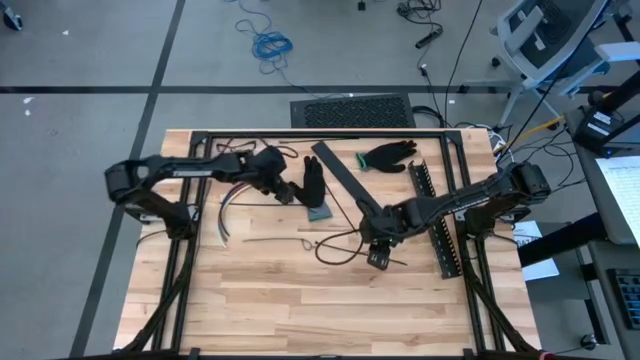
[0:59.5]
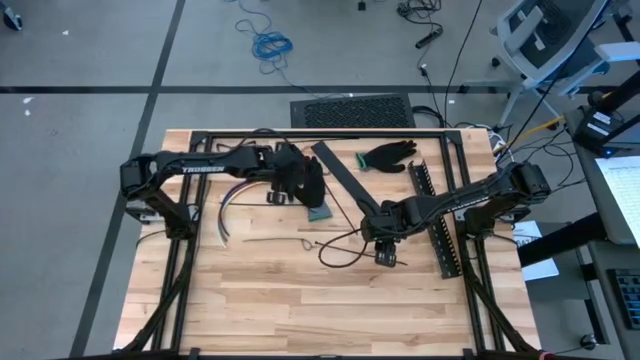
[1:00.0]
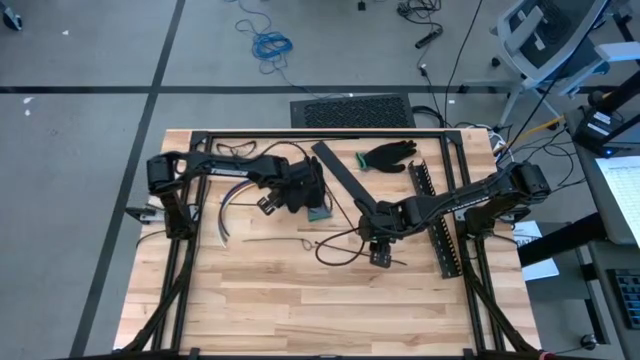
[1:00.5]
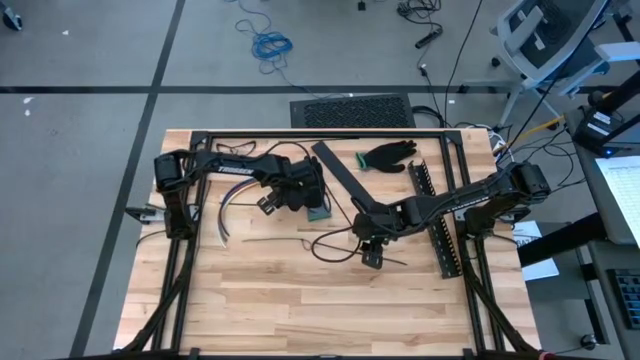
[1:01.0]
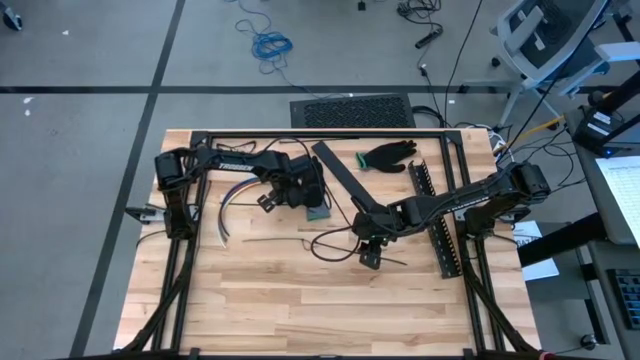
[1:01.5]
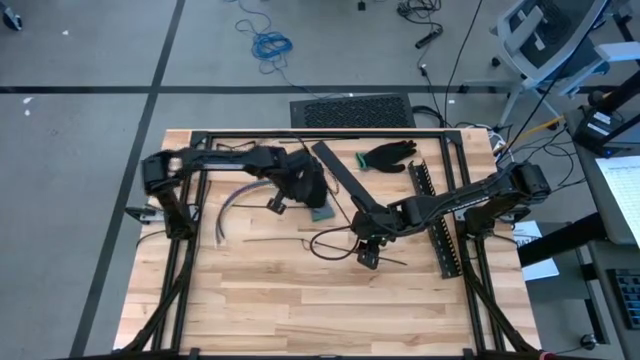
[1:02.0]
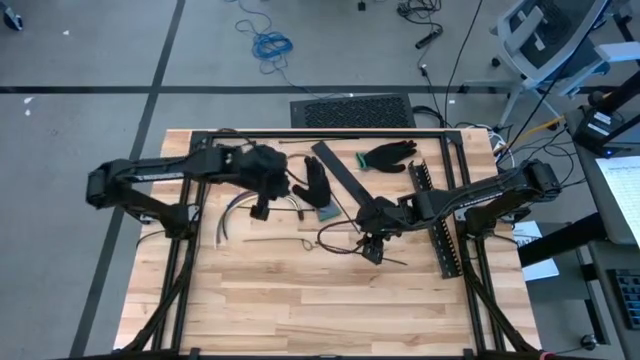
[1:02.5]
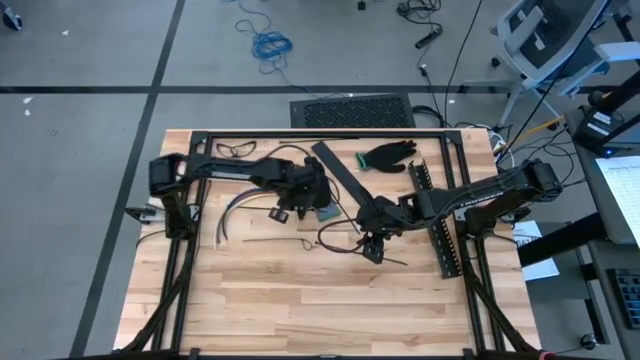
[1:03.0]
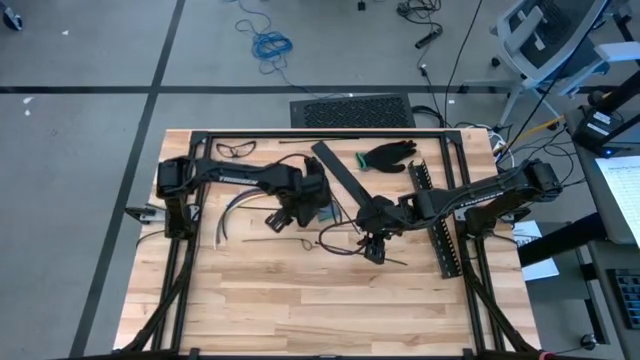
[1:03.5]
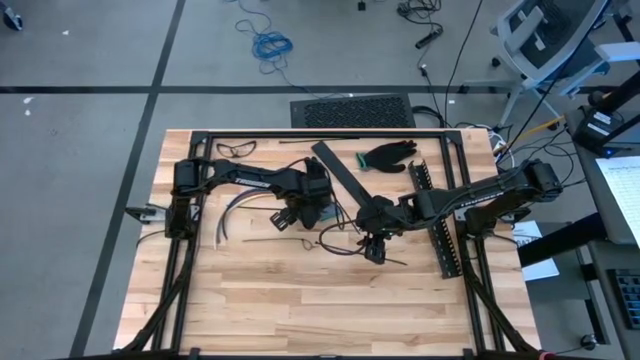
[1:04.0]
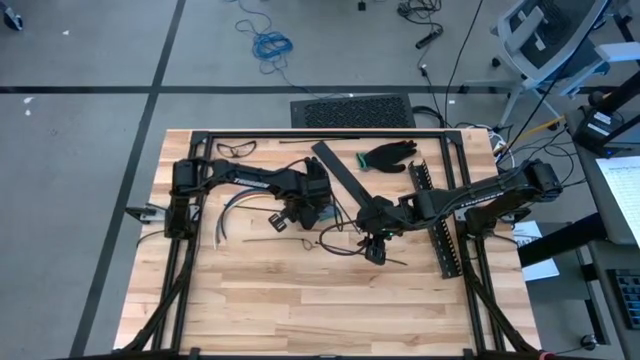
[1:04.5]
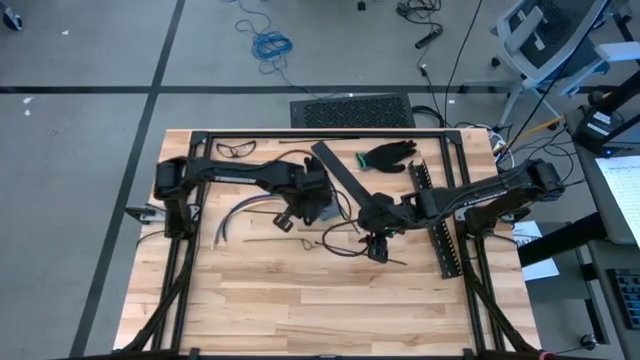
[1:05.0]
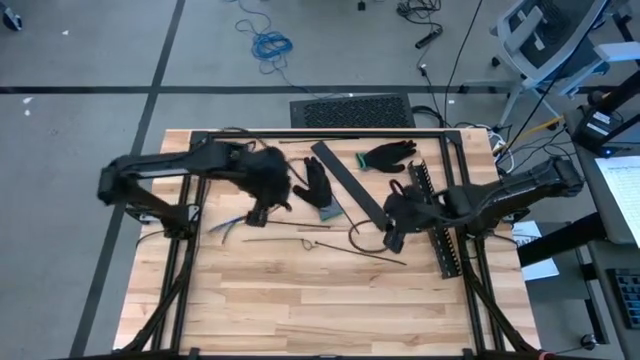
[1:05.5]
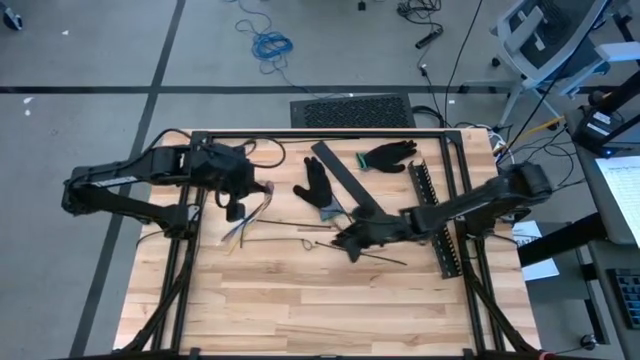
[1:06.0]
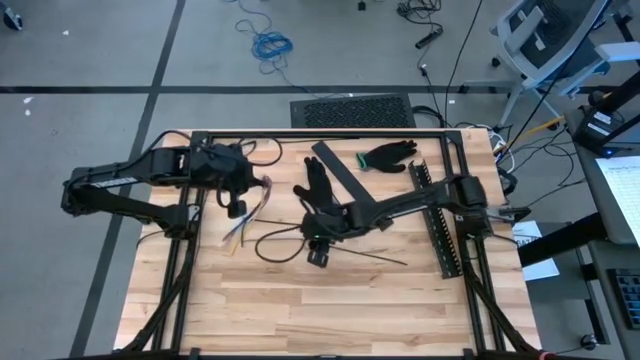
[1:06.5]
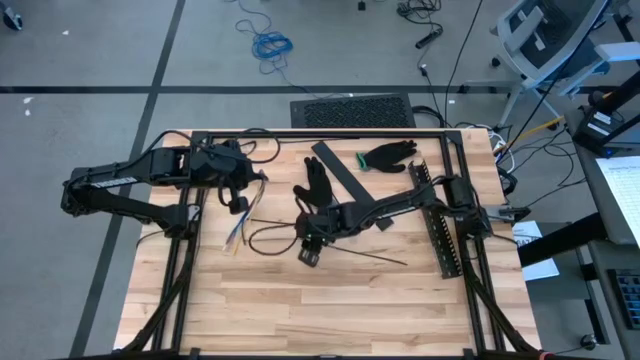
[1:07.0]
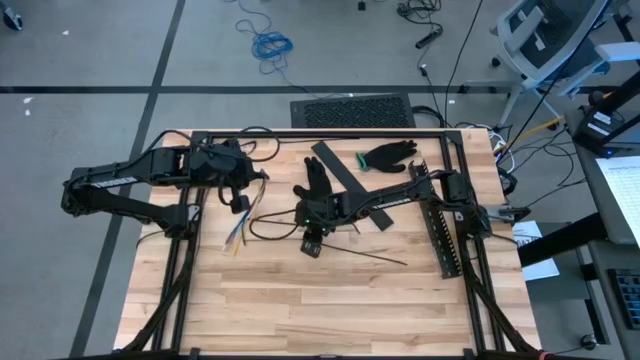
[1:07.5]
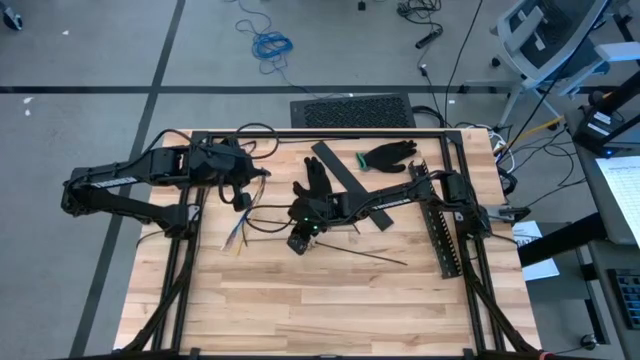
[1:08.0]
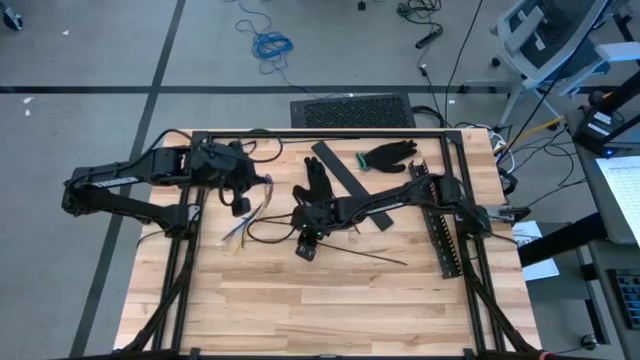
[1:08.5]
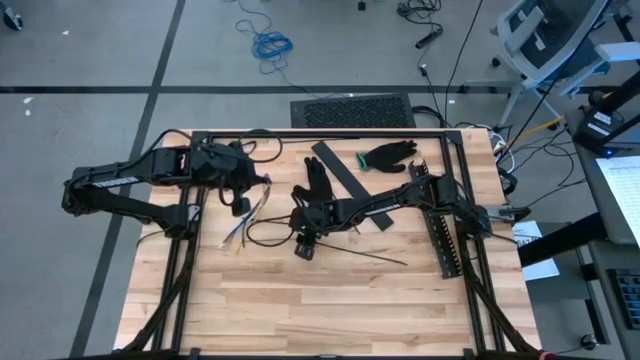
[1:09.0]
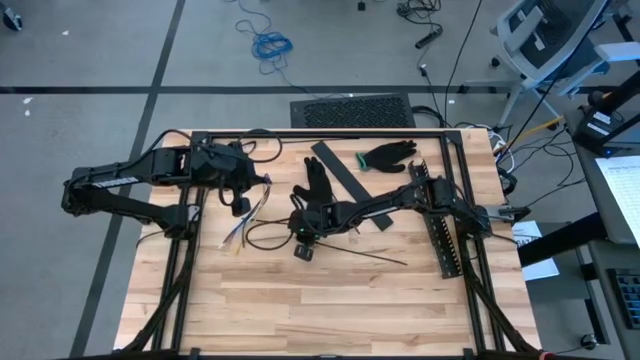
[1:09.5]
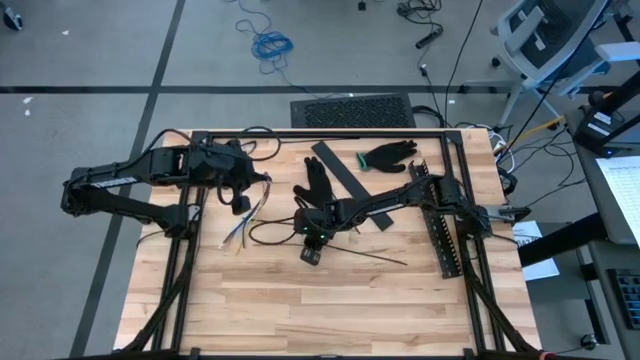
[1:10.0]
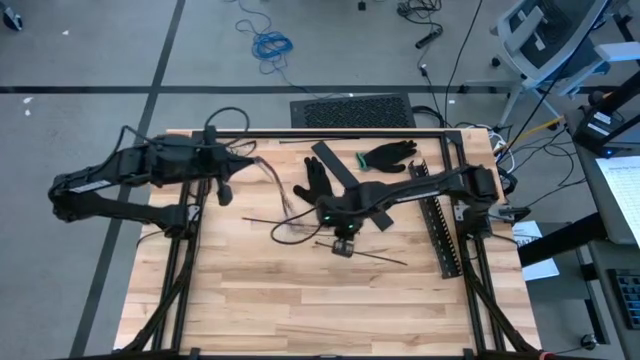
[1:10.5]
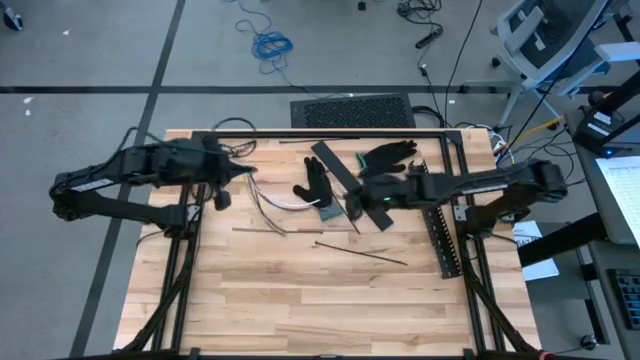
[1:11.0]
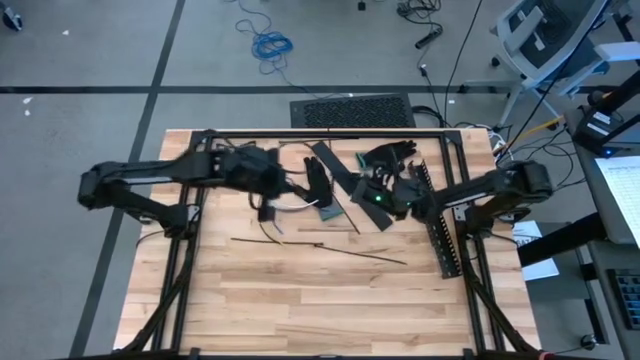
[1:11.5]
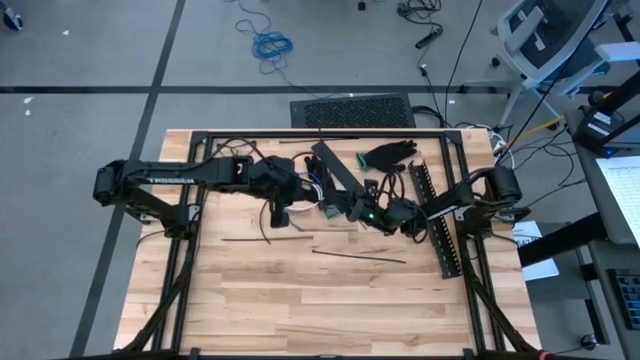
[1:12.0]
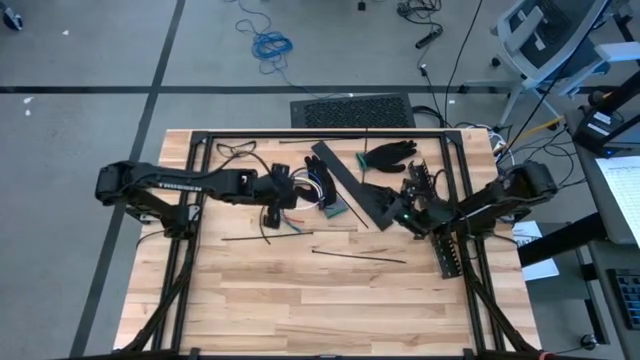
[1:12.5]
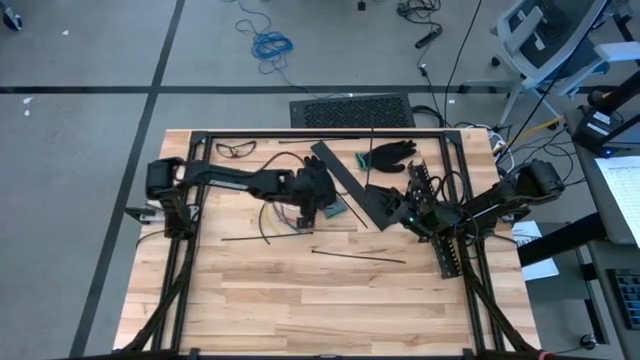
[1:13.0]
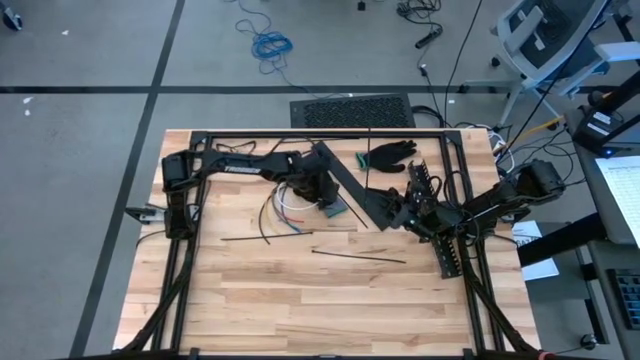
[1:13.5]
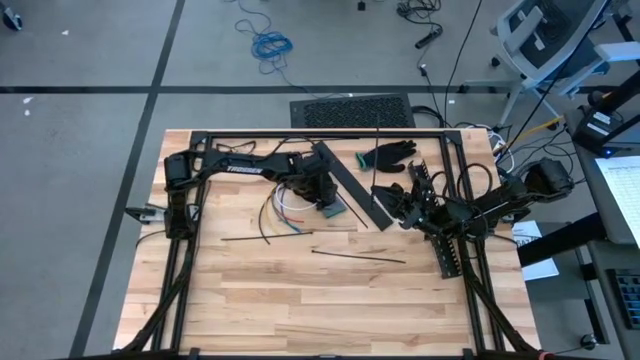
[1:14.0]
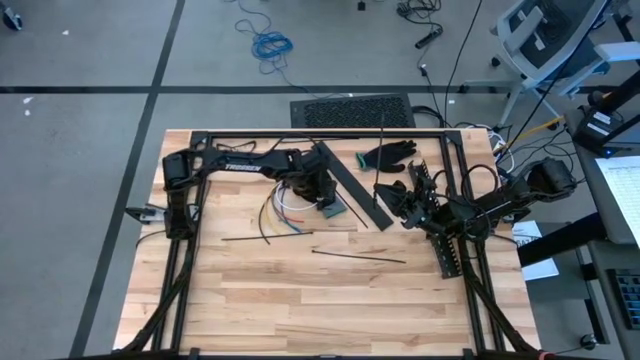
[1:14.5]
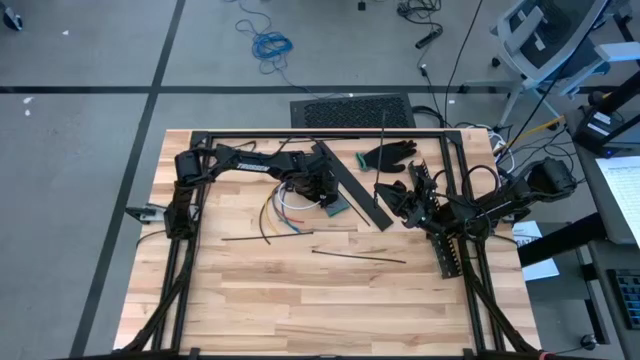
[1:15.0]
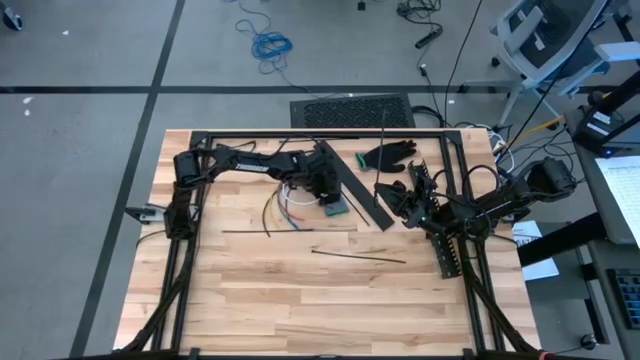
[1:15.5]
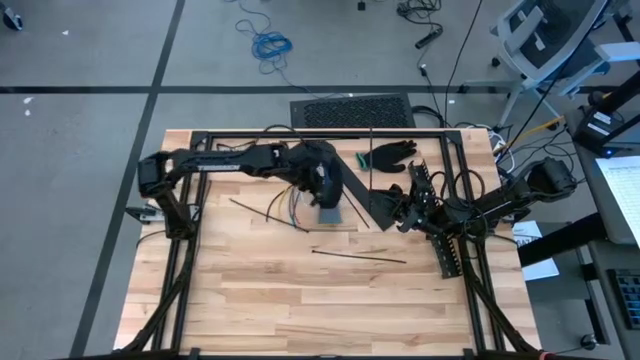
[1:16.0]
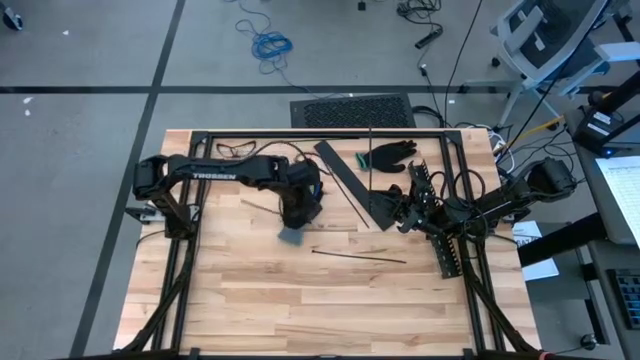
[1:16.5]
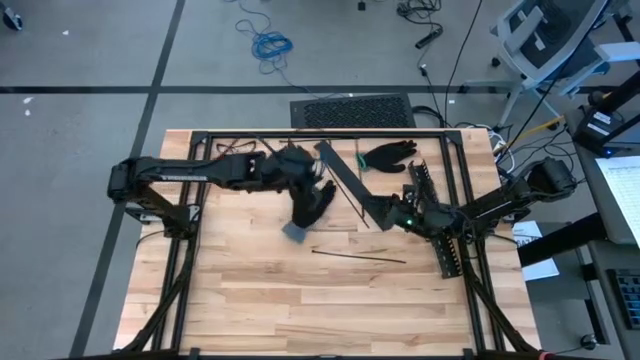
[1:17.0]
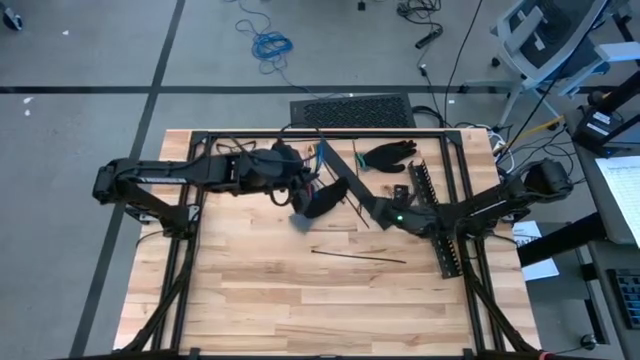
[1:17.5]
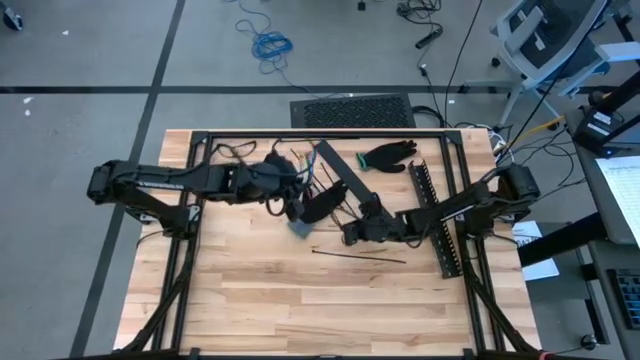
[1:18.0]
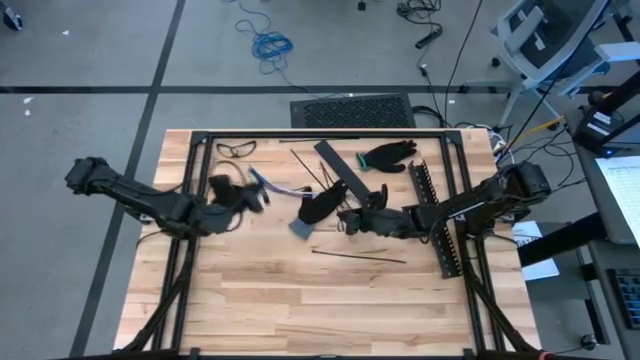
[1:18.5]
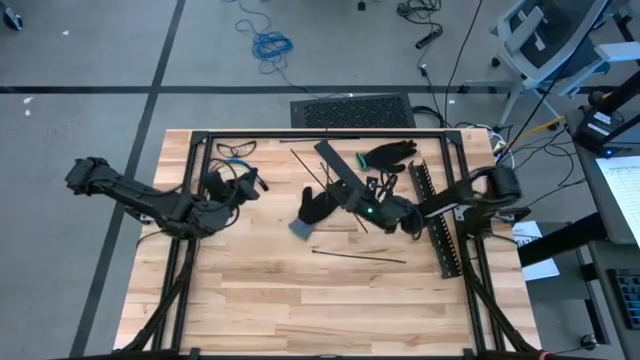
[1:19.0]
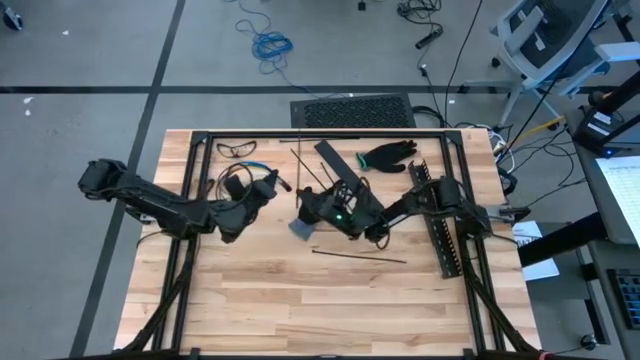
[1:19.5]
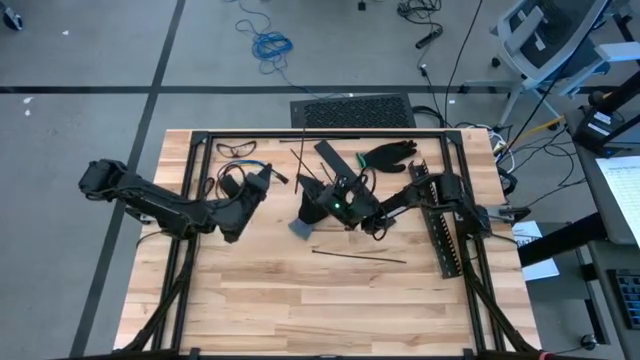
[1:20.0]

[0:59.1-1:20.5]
Task: Ziptie cables
Wrap the black zip tie on the cable
